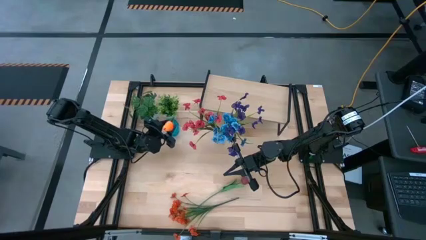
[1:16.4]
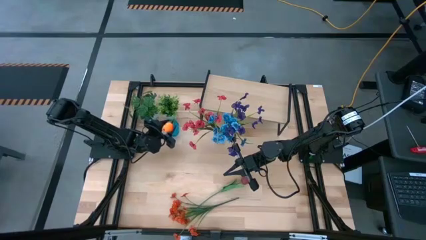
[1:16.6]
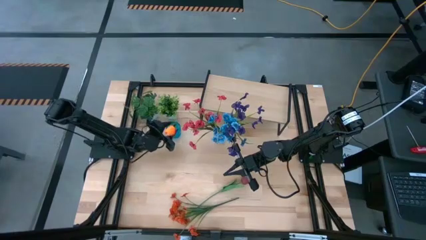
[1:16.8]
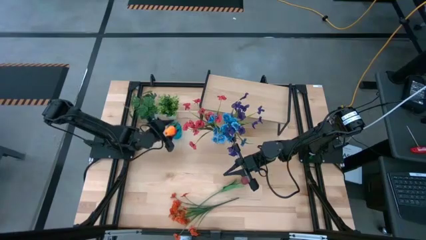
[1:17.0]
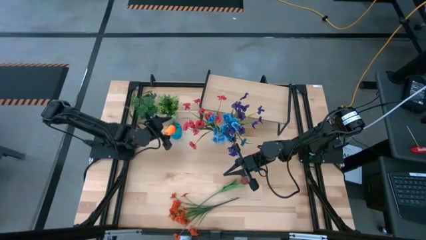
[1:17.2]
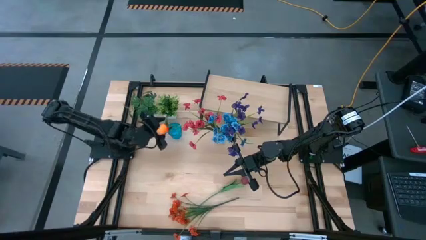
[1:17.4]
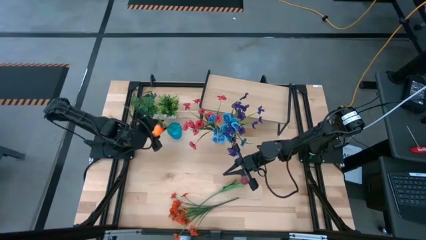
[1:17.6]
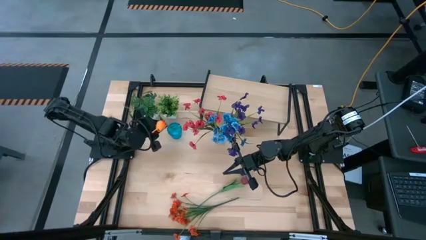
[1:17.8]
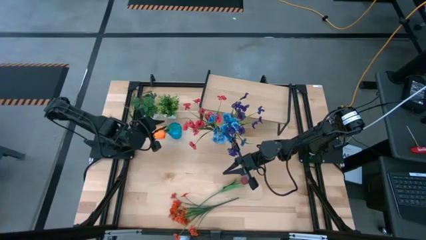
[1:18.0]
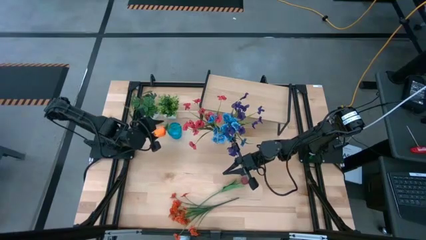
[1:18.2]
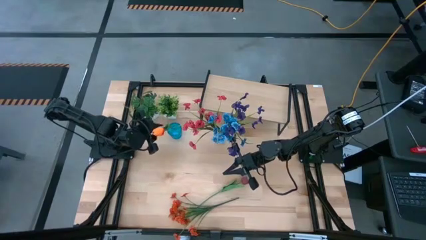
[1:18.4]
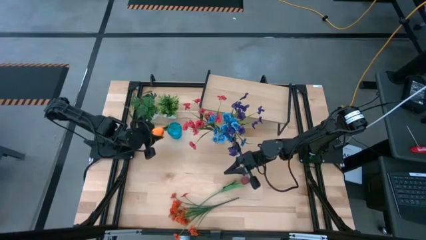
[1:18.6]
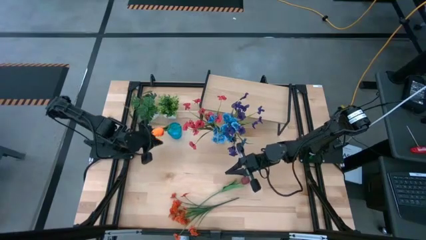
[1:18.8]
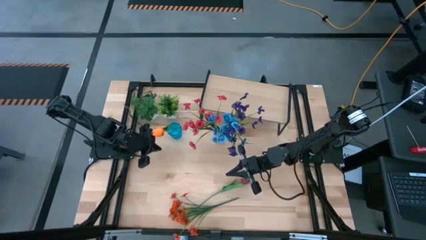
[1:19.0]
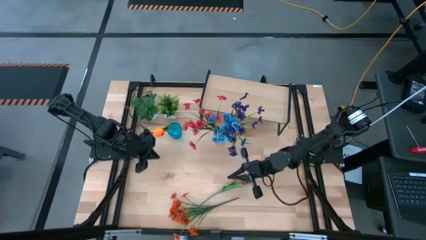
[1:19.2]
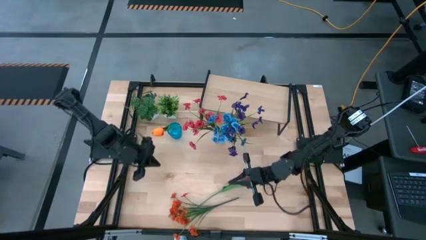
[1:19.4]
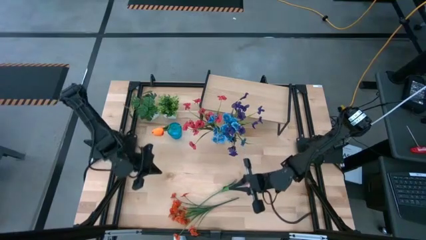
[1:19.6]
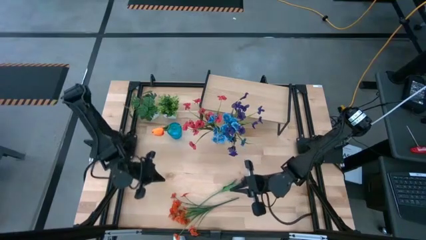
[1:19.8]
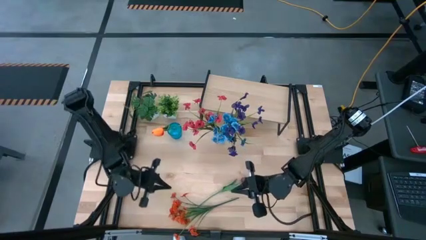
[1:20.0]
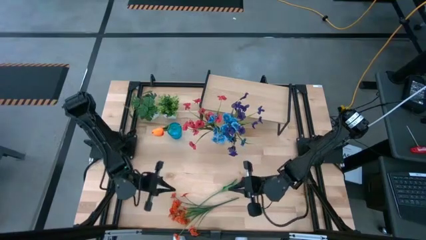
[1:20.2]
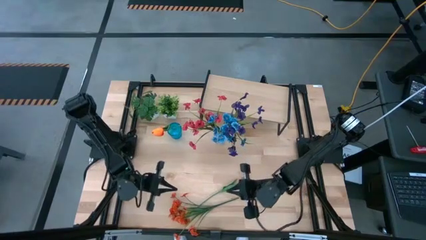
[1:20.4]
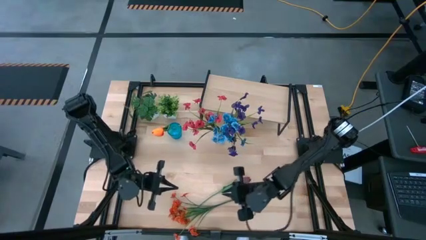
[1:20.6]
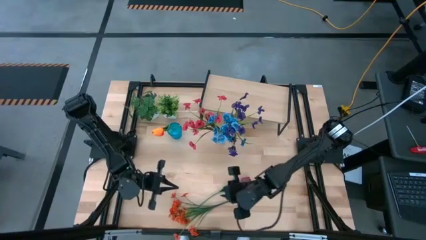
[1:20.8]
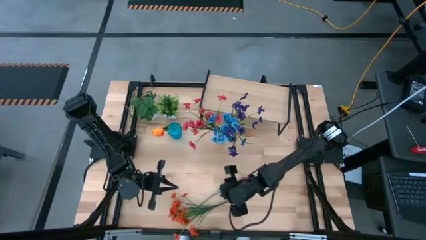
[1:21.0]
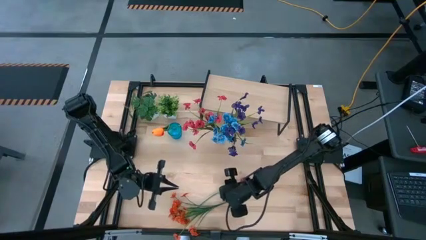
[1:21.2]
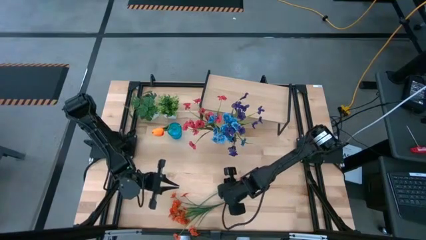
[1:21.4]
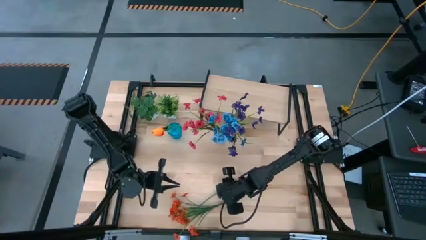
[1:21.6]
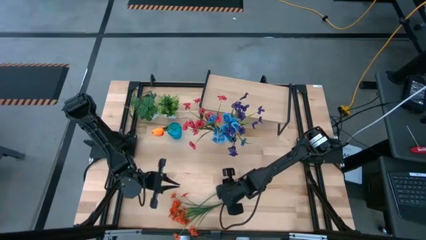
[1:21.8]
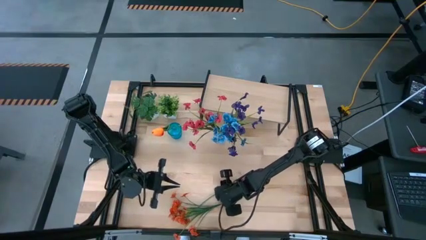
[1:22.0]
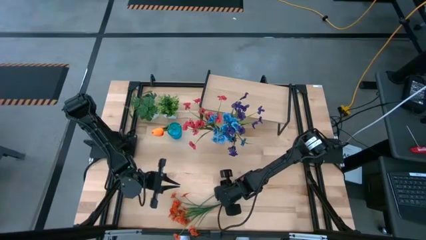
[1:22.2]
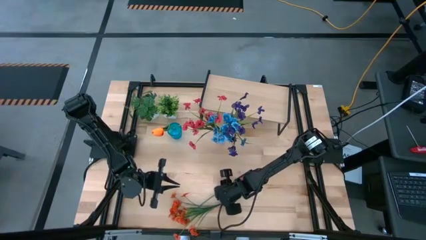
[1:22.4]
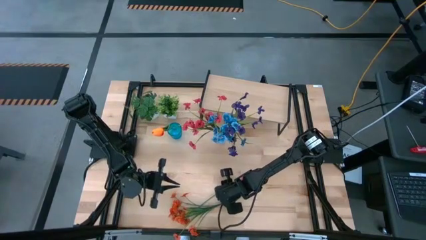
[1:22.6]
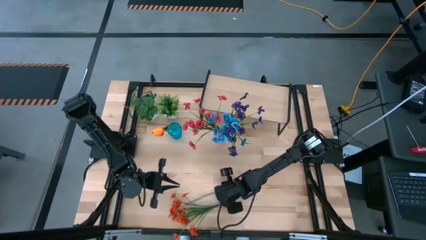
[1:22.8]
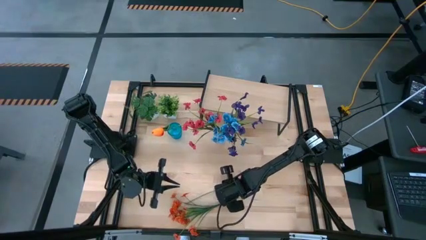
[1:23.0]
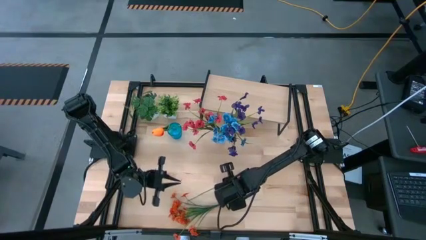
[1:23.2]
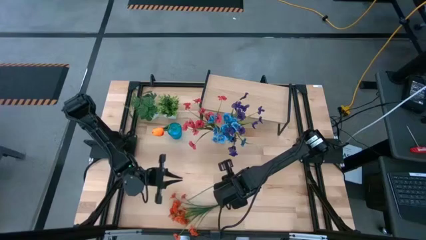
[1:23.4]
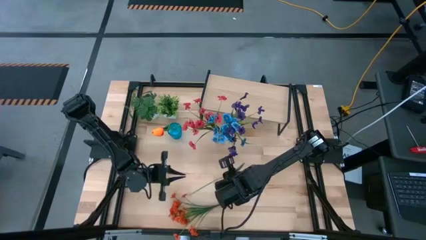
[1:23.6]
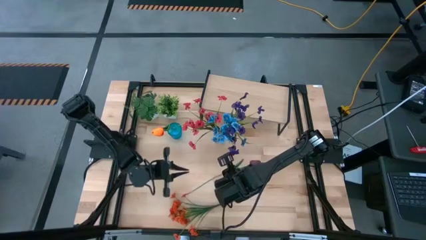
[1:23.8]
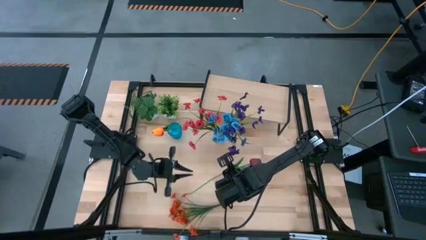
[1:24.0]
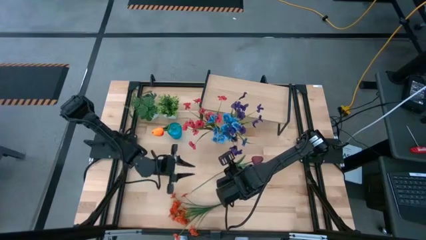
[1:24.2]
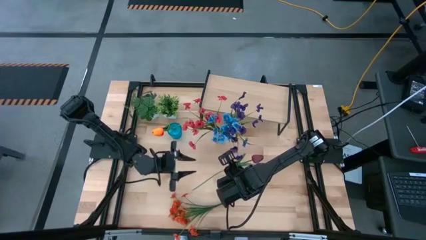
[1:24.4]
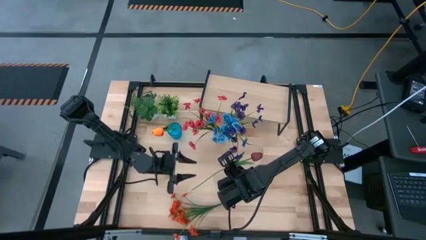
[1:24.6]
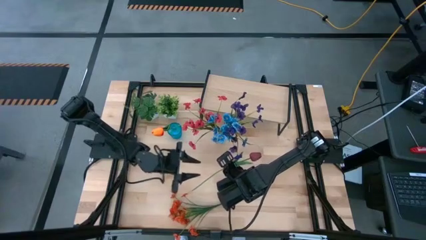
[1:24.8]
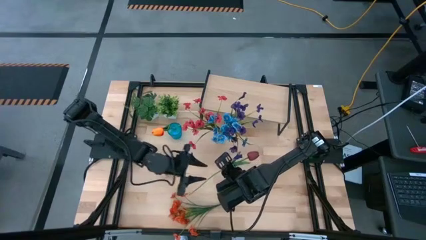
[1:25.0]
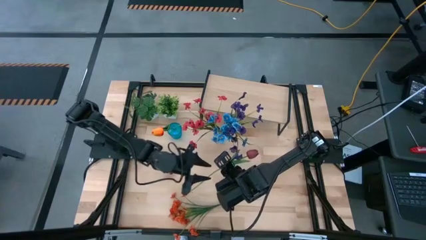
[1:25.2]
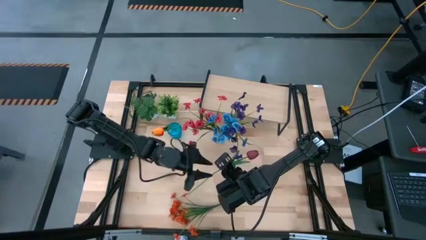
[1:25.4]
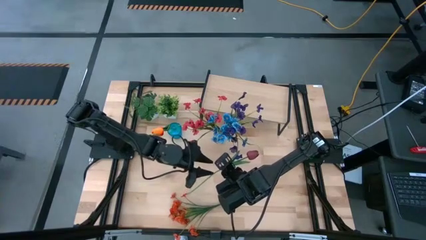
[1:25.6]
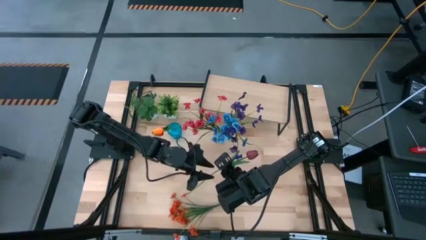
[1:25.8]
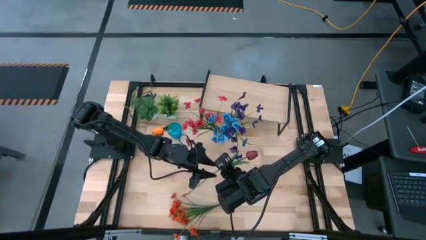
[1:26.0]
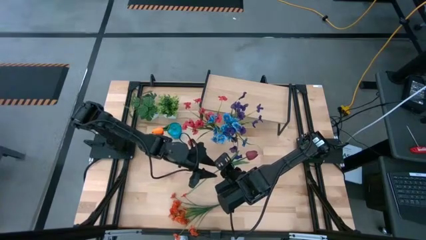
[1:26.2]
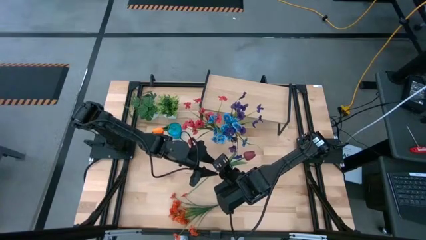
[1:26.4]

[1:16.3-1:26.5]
Task: Pick and place flowers into a vace then onto a shelf
Put the dark red tulip into the blue vase
